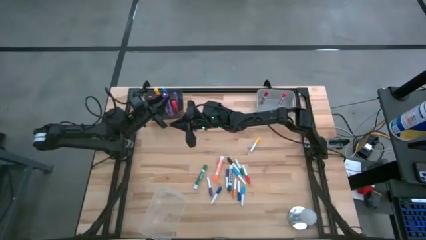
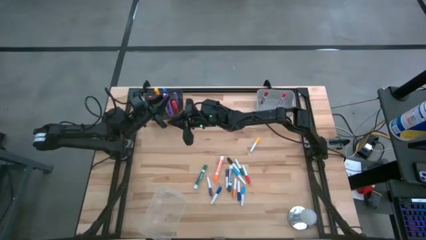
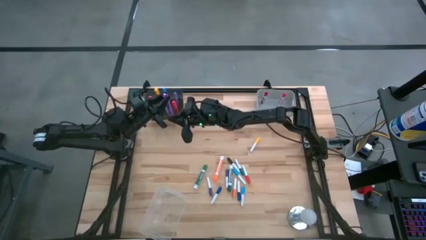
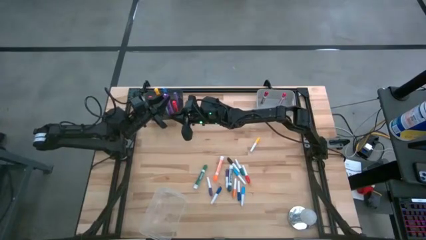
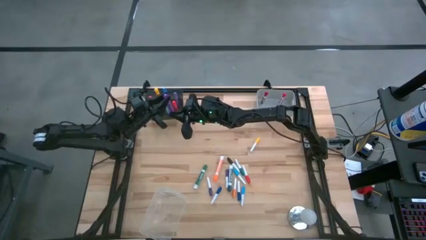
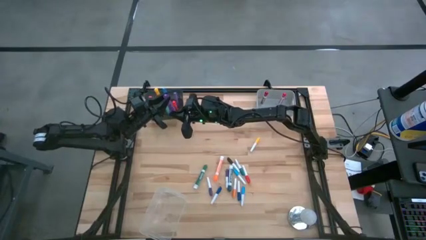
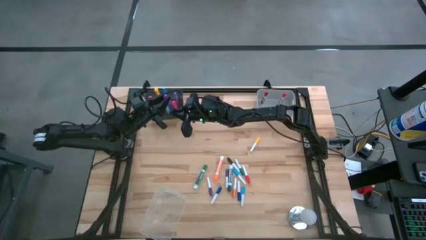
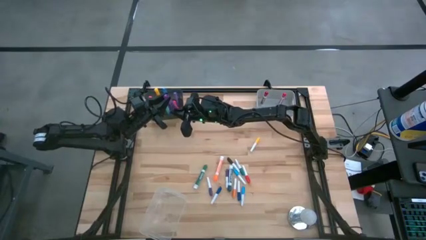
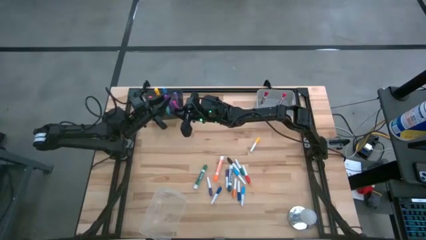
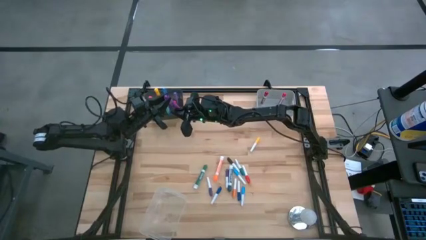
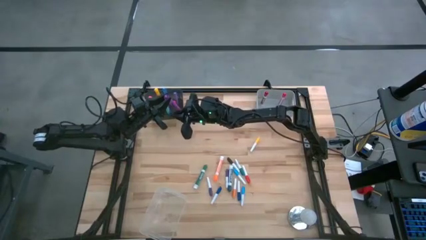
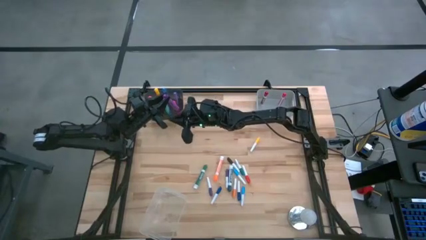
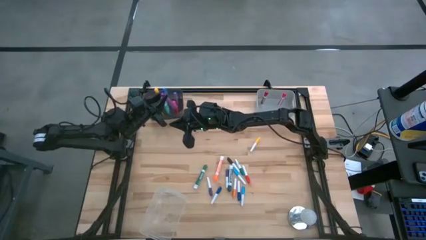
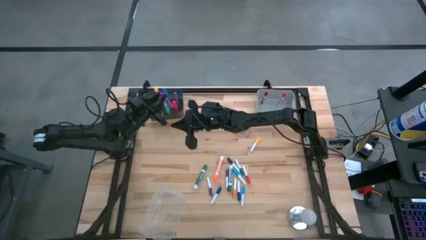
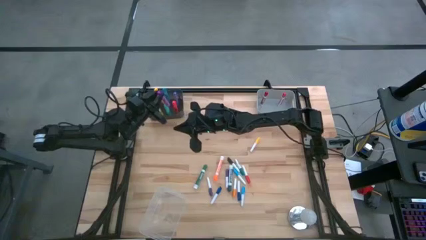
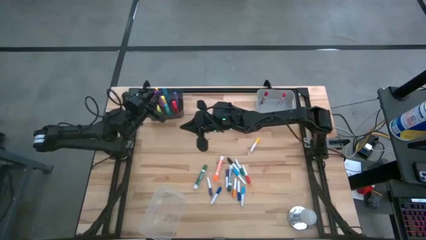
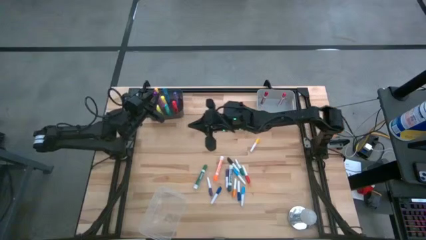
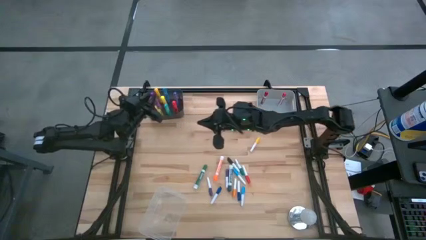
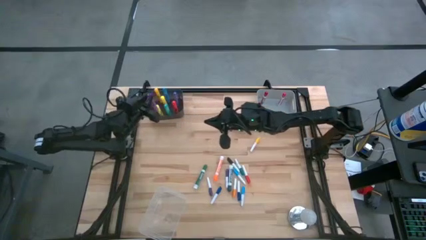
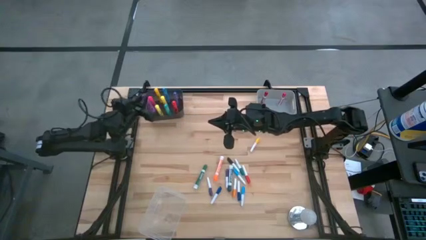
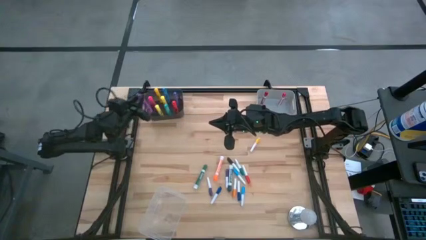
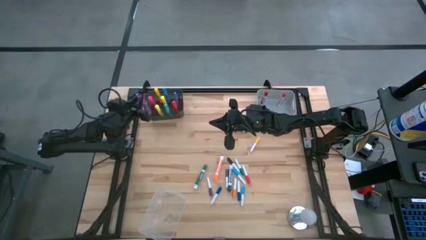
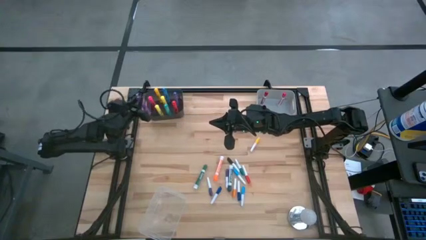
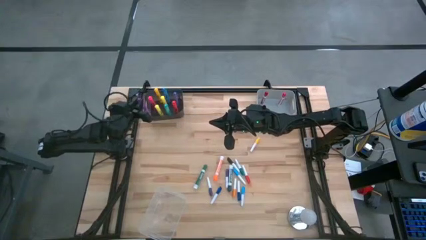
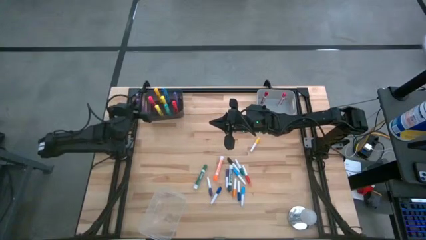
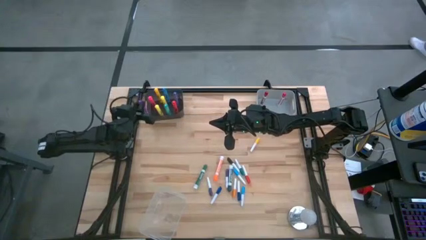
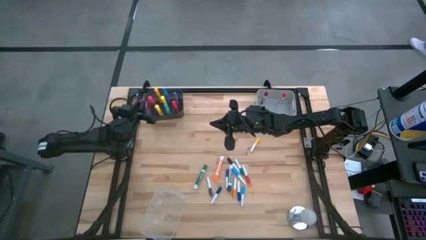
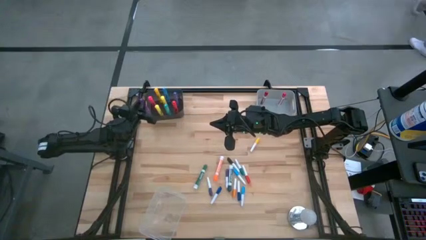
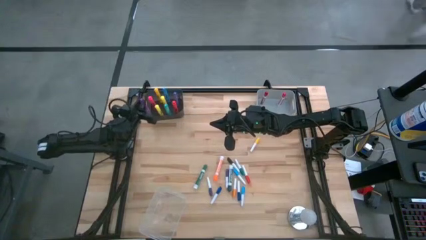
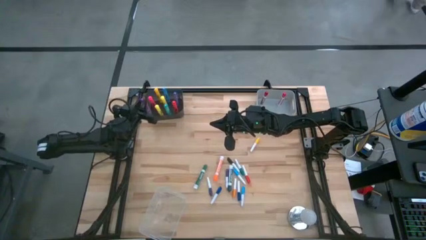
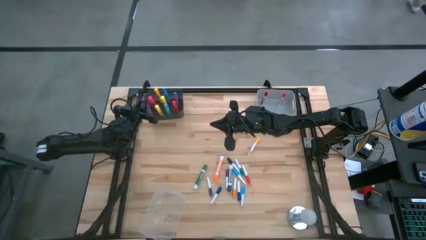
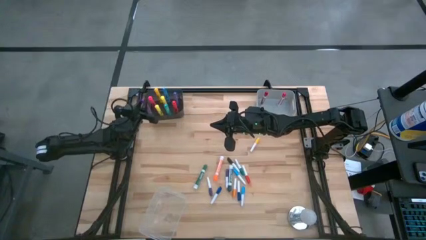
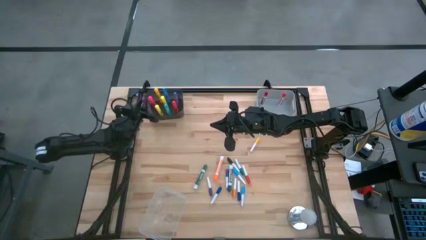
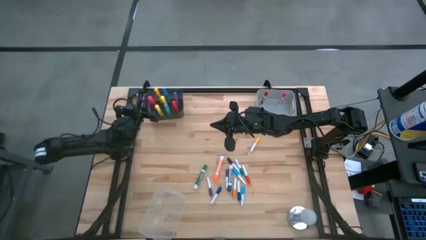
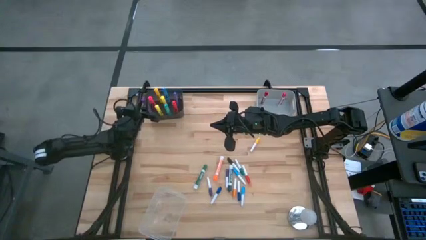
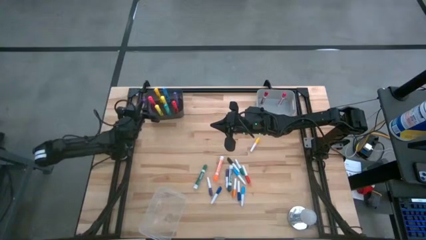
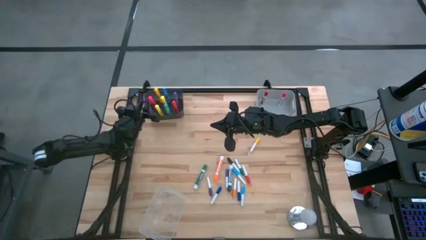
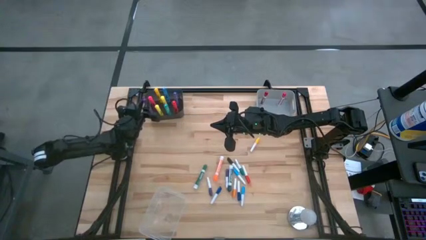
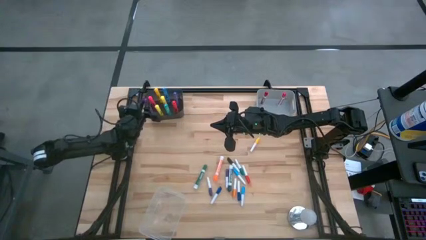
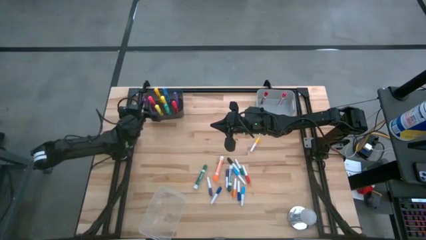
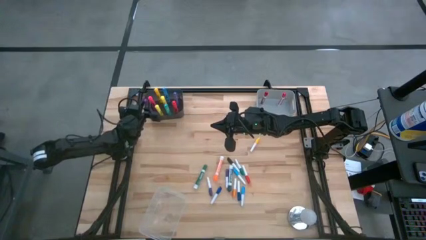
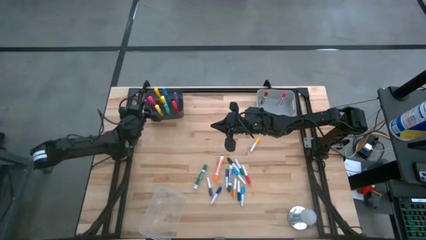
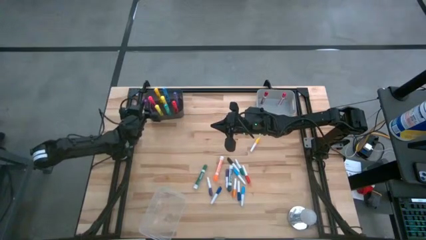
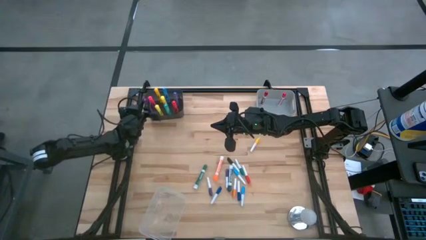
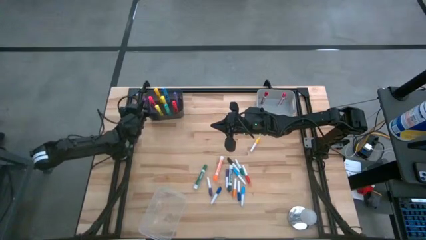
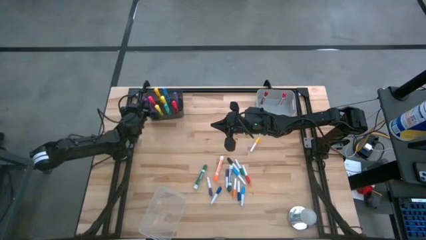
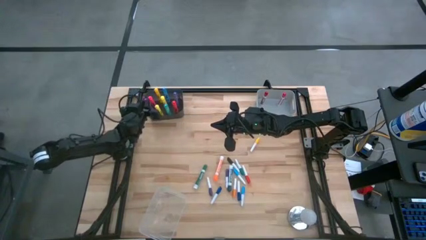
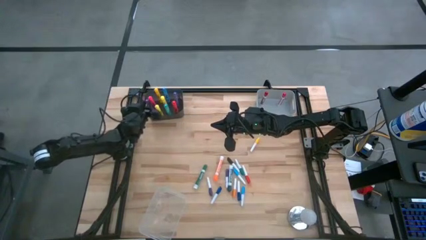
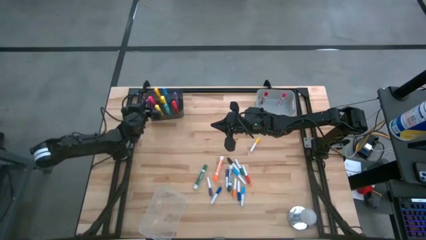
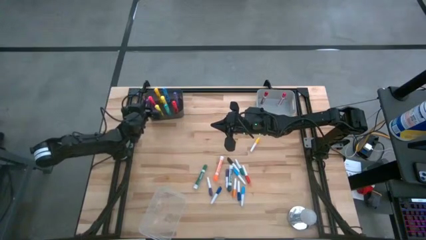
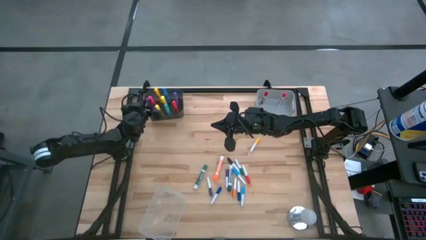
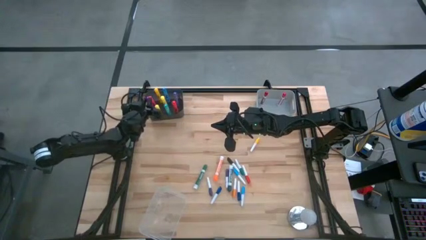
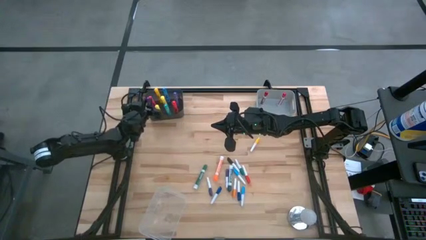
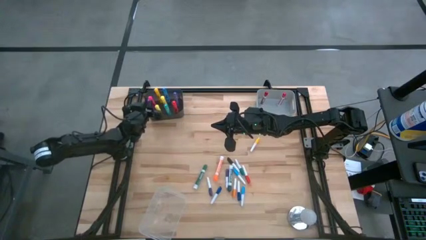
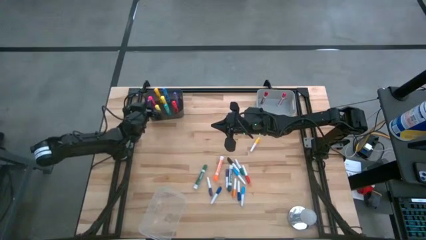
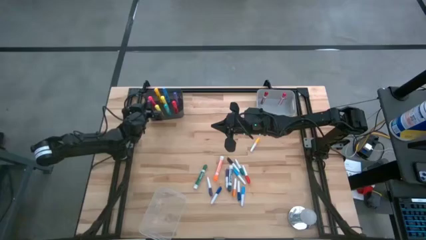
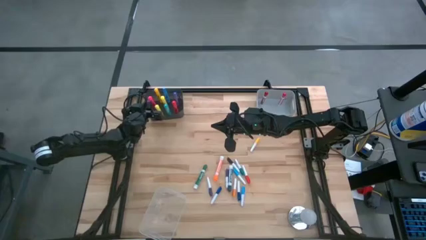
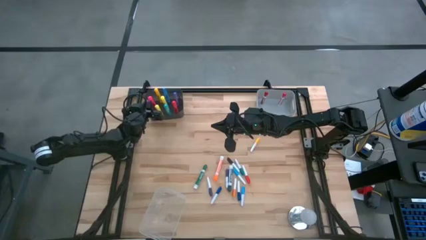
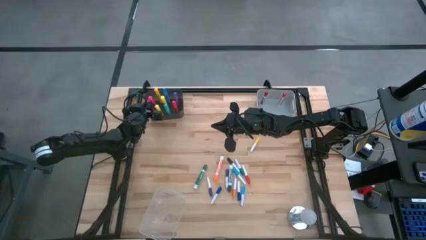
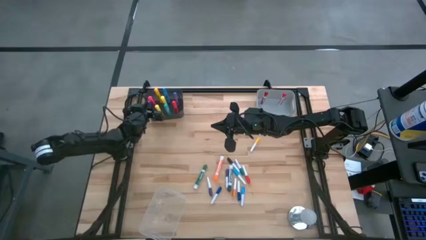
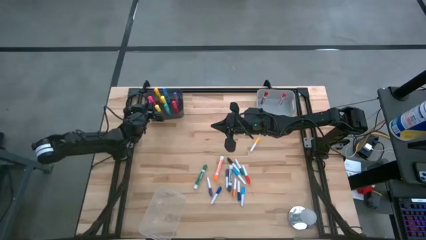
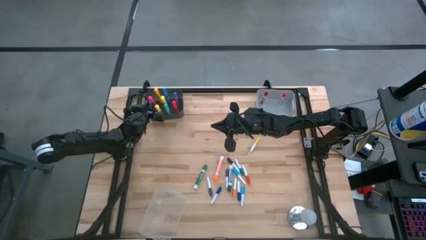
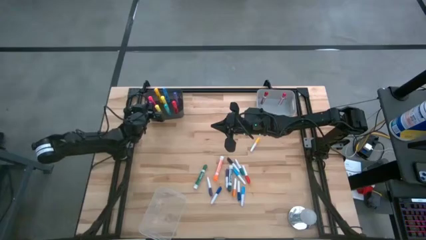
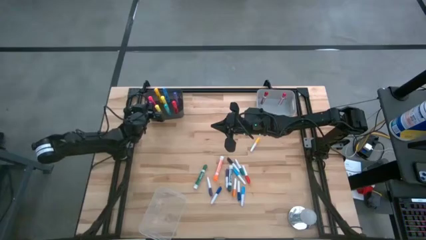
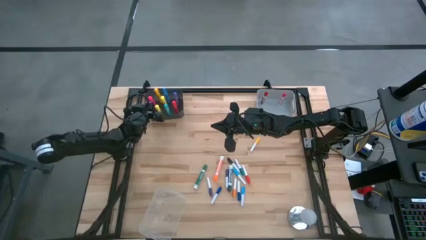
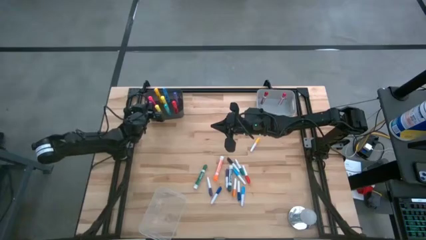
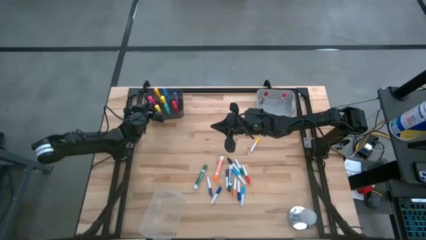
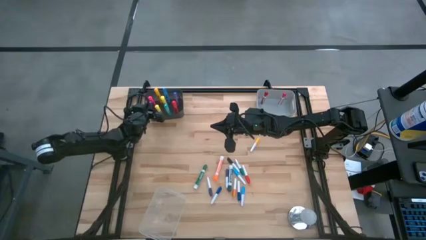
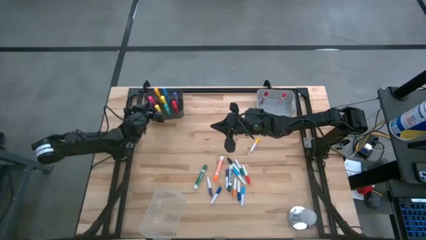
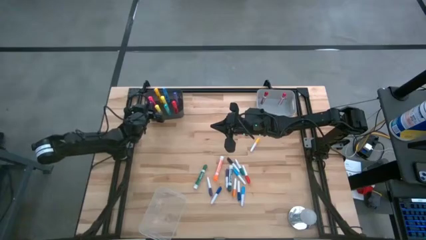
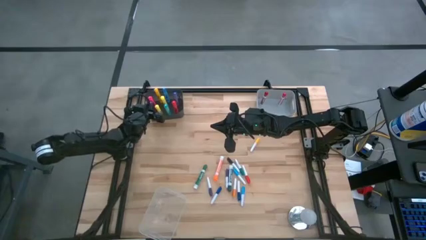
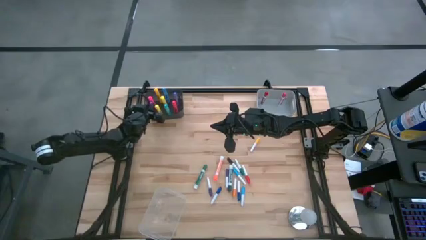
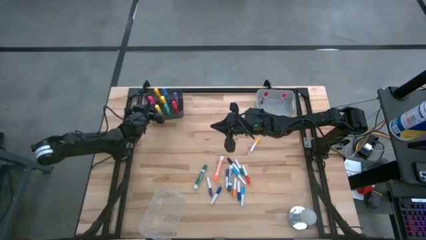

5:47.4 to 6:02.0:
Task: Pick & Place Markers
Put the violet highlighter pen into the black bin
